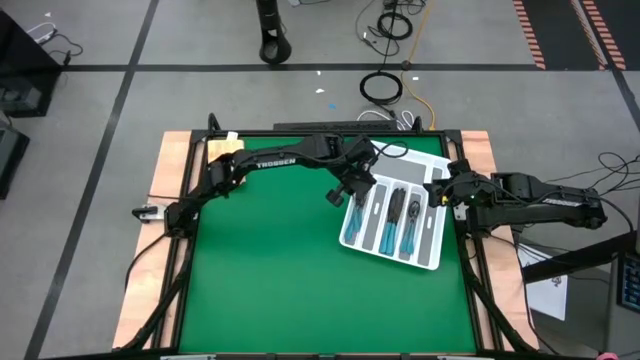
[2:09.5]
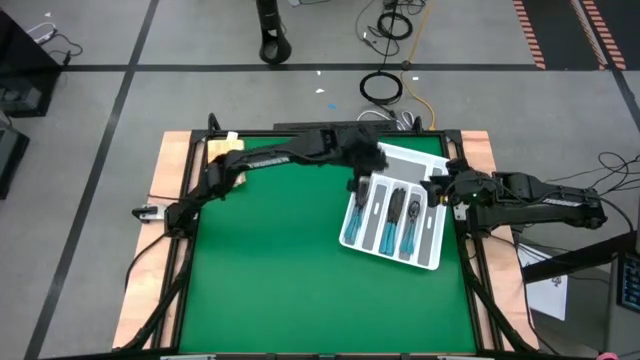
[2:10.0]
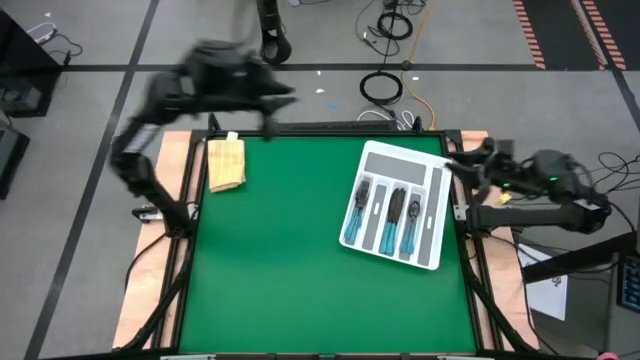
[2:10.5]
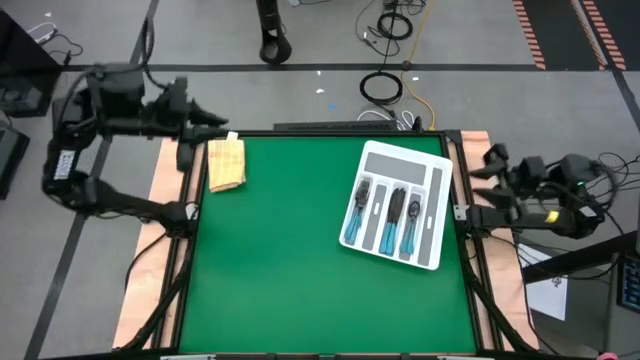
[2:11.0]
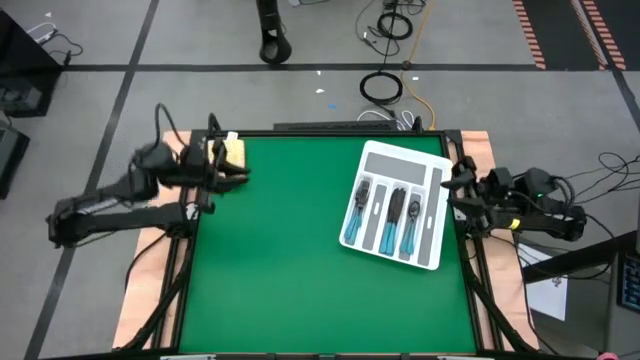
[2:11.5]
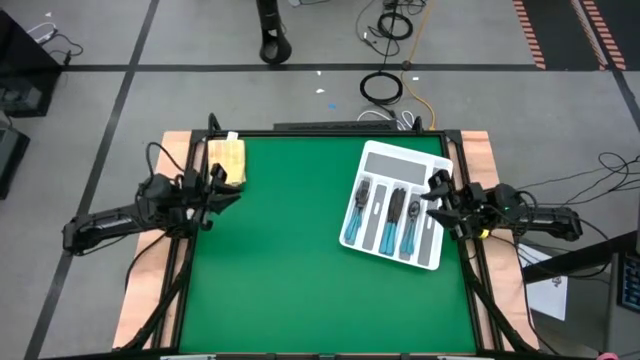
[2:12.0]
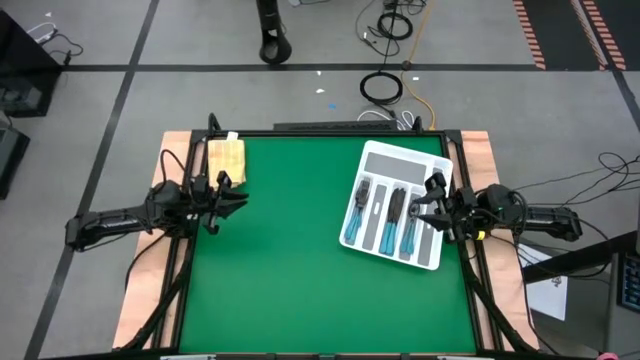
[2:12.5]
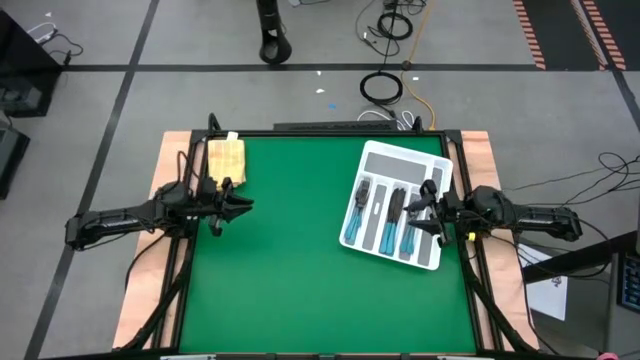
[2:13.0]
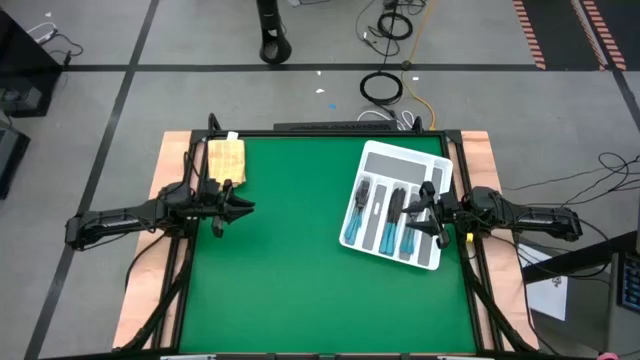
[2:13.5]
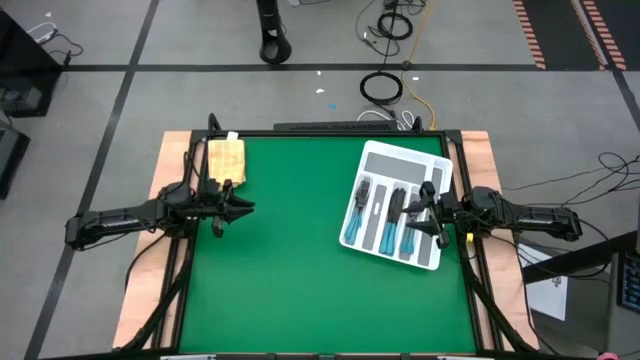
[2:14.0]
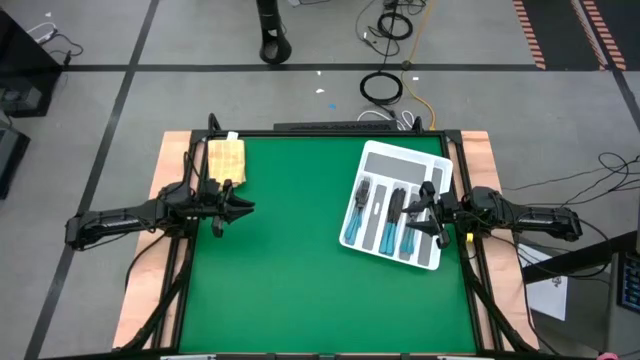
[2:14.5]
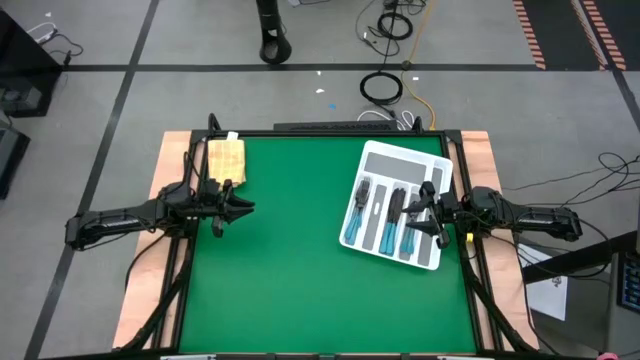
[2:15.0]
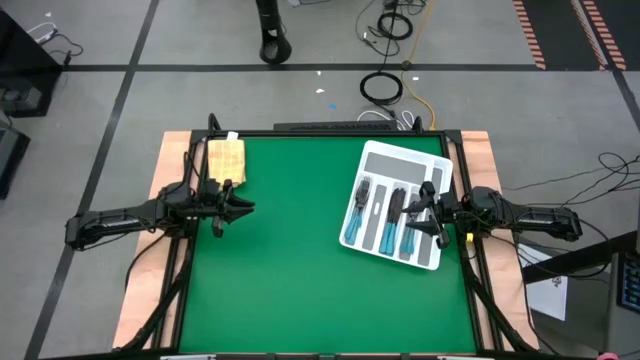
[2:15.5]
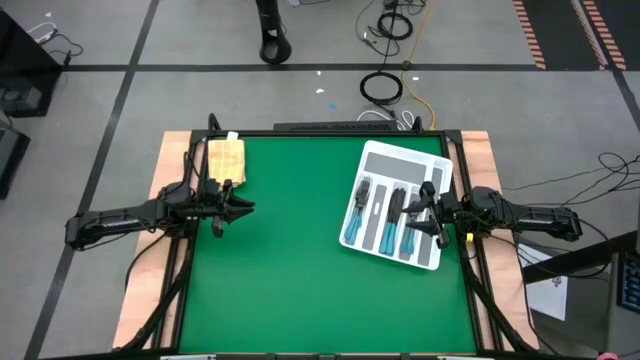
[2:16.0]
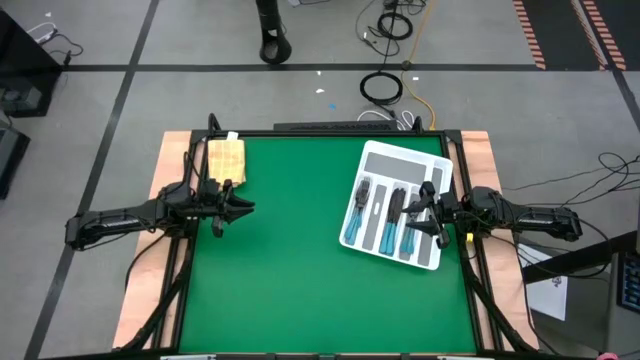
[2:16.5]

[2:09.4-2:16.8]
Task: Sort silverware
Return to Home Position

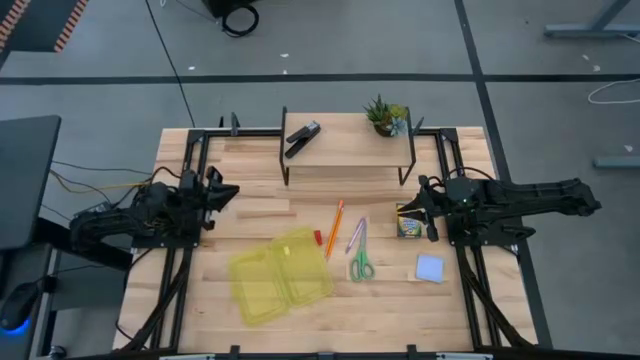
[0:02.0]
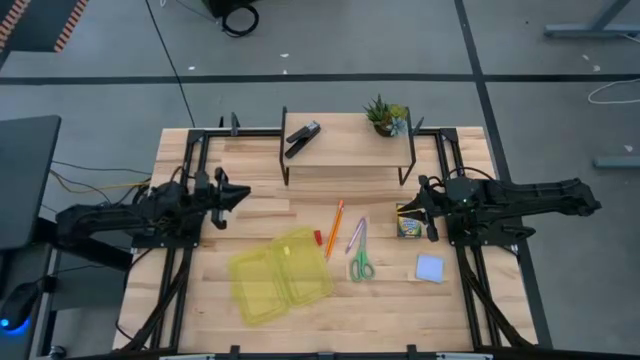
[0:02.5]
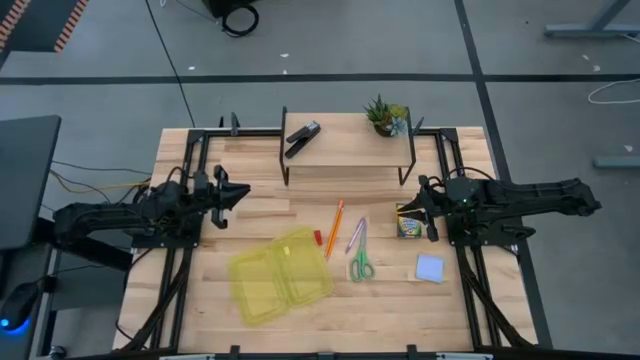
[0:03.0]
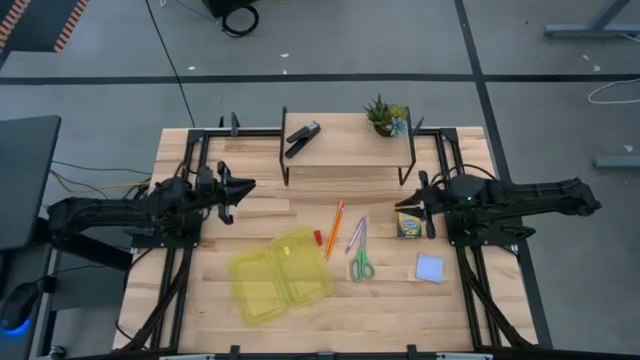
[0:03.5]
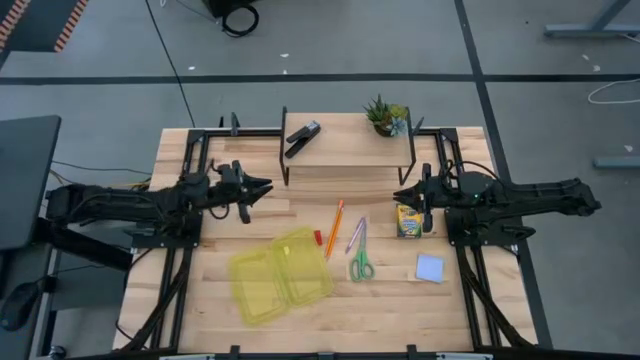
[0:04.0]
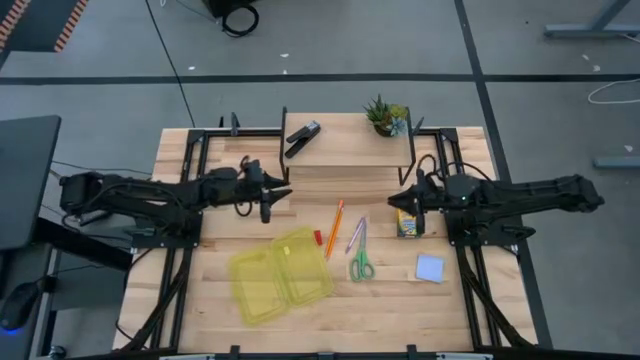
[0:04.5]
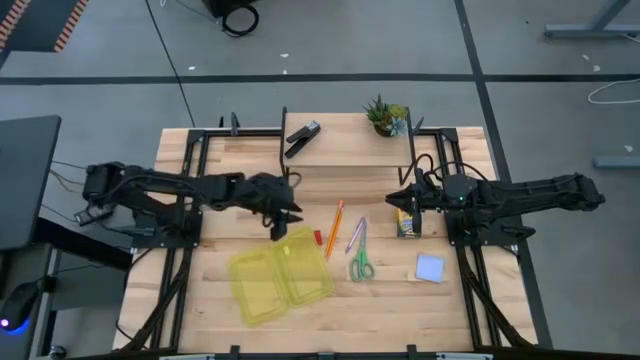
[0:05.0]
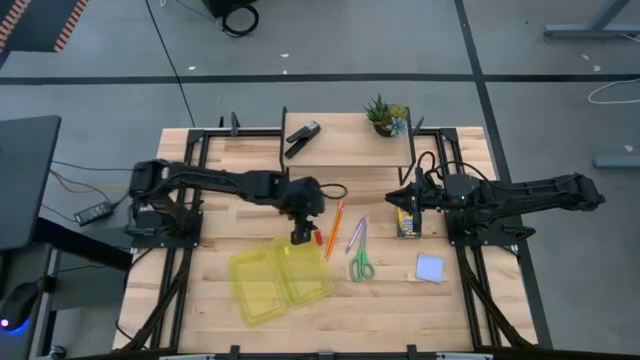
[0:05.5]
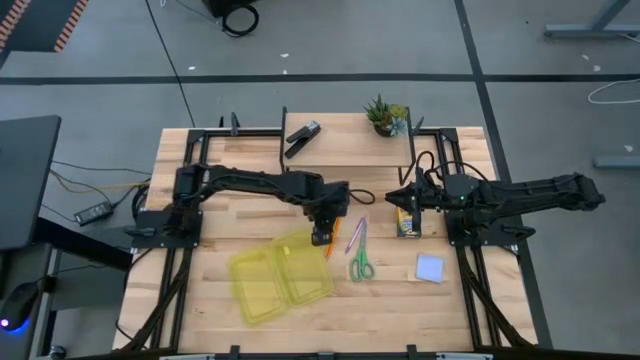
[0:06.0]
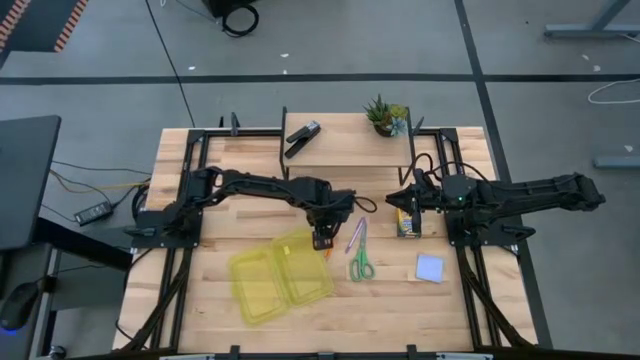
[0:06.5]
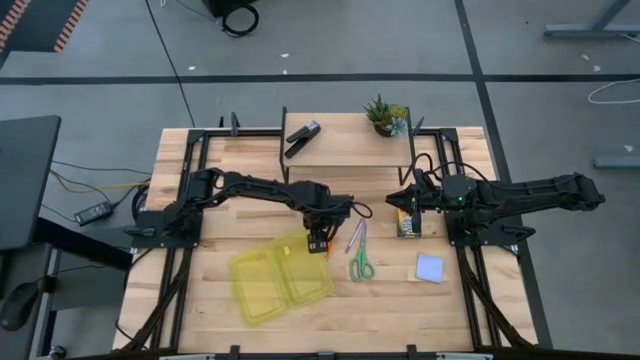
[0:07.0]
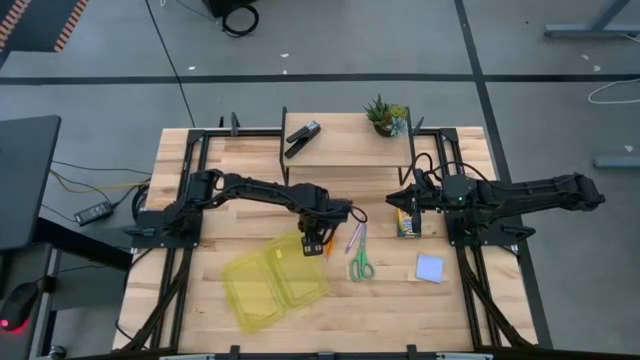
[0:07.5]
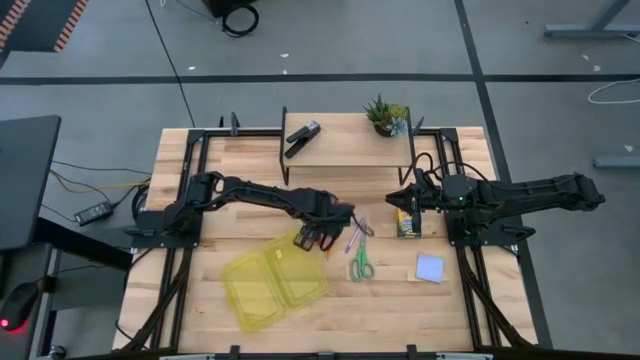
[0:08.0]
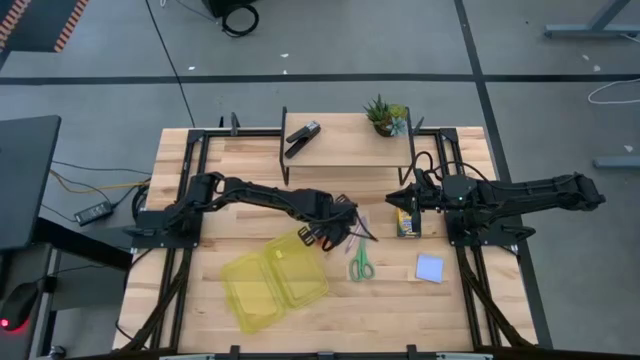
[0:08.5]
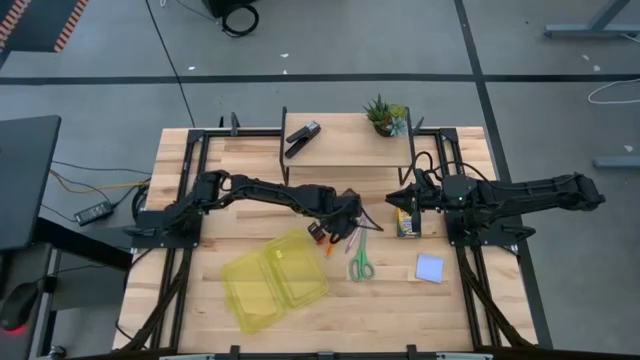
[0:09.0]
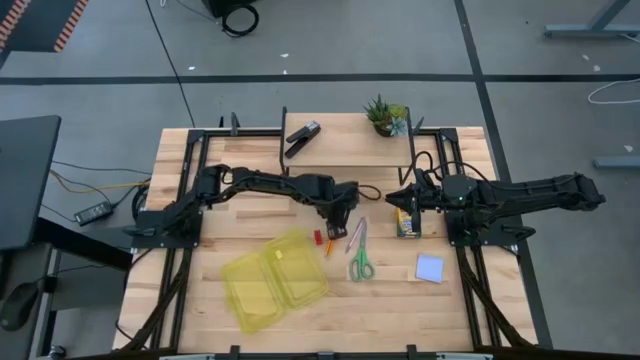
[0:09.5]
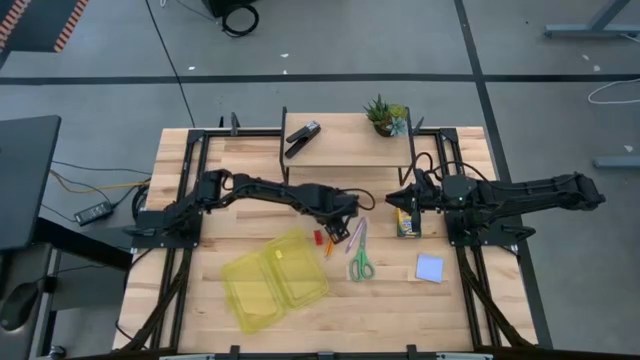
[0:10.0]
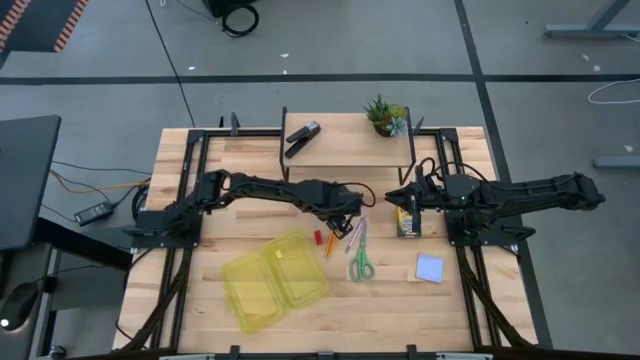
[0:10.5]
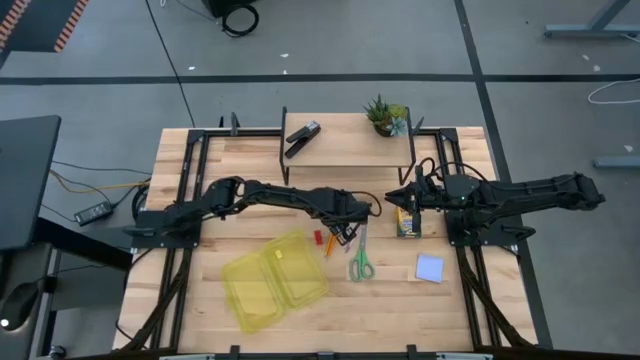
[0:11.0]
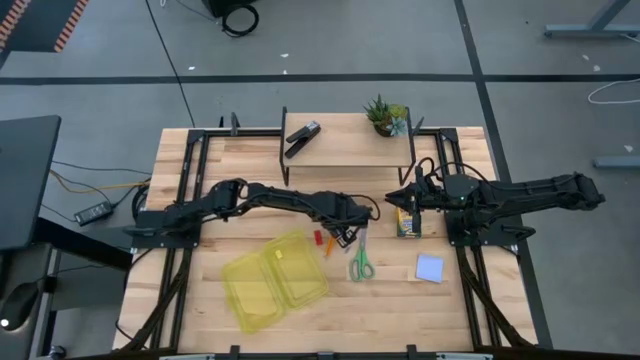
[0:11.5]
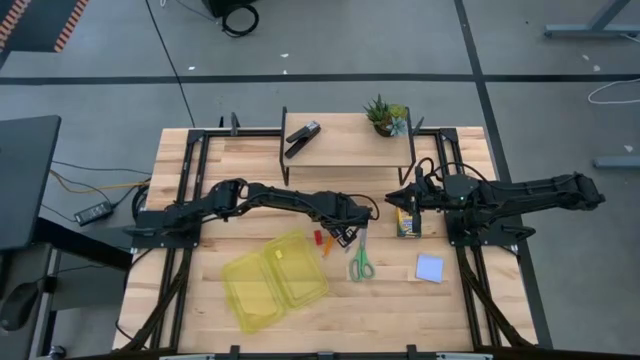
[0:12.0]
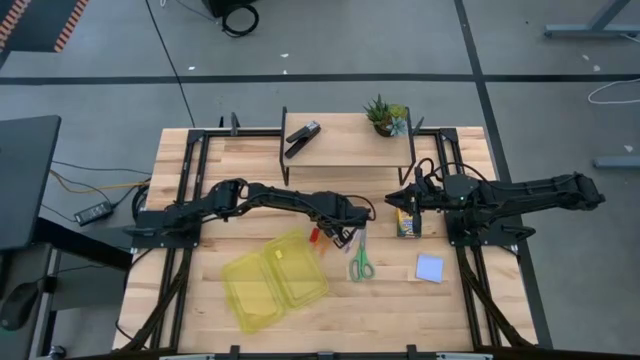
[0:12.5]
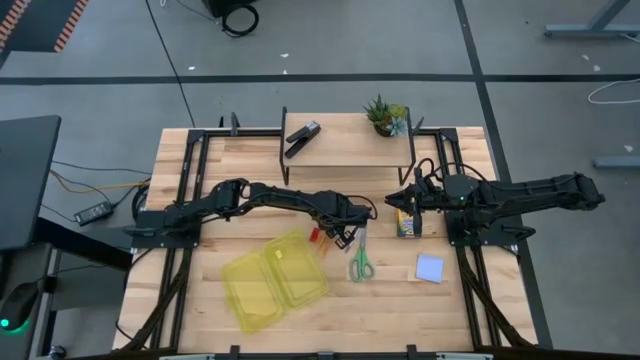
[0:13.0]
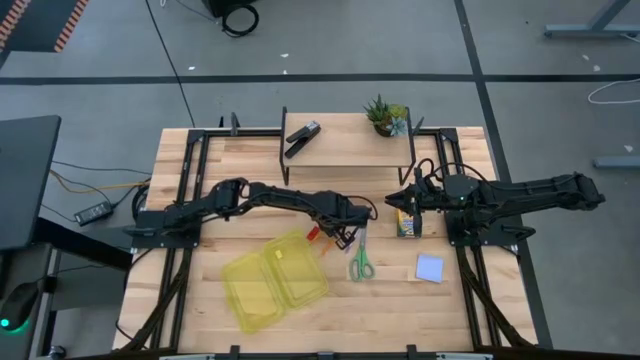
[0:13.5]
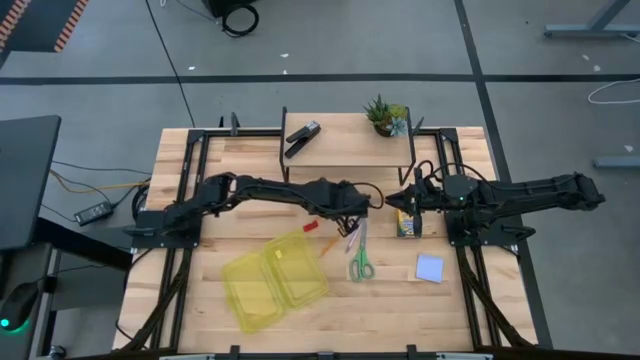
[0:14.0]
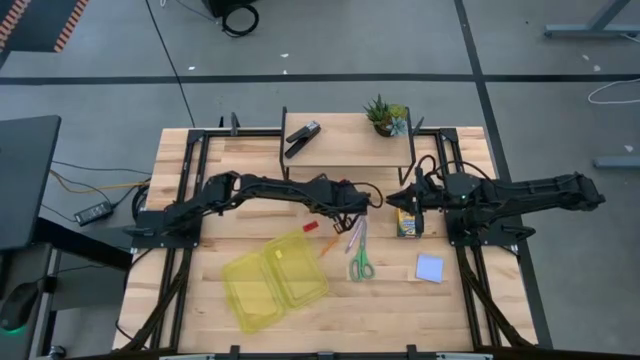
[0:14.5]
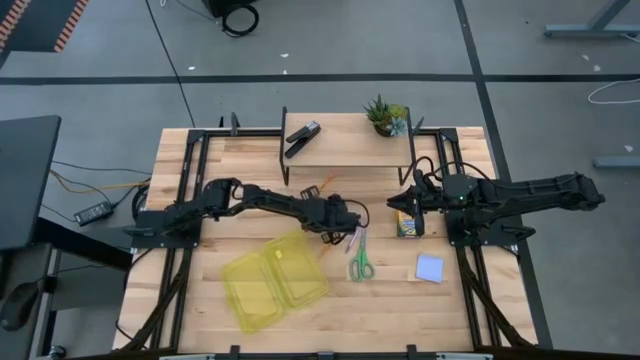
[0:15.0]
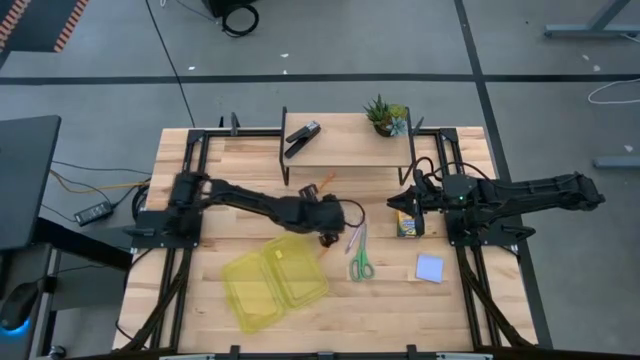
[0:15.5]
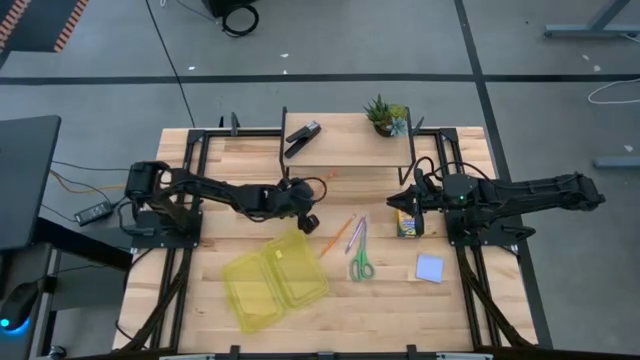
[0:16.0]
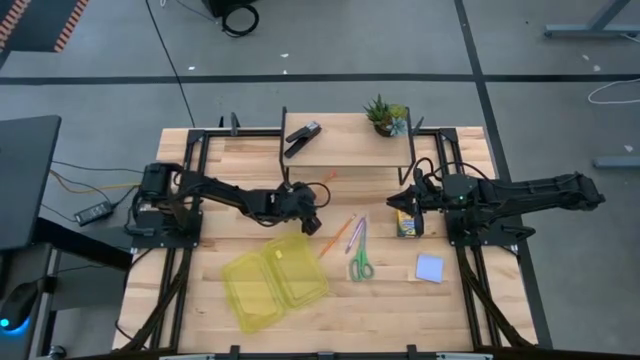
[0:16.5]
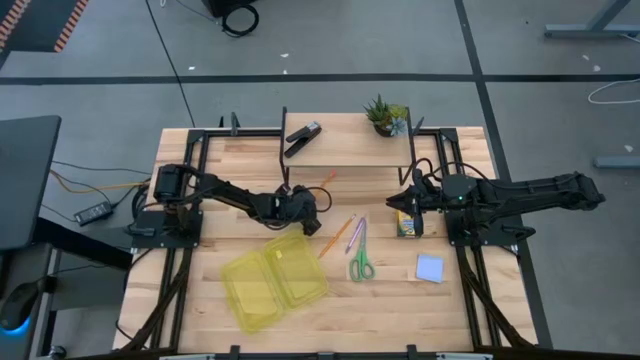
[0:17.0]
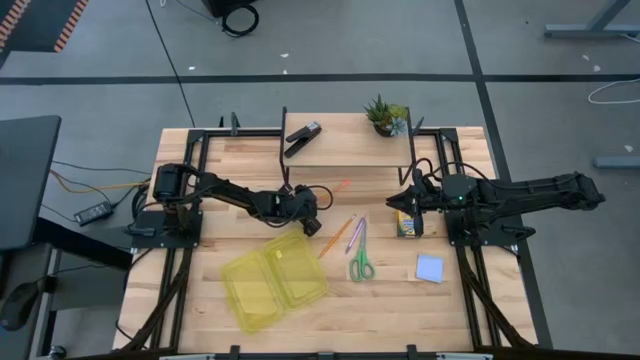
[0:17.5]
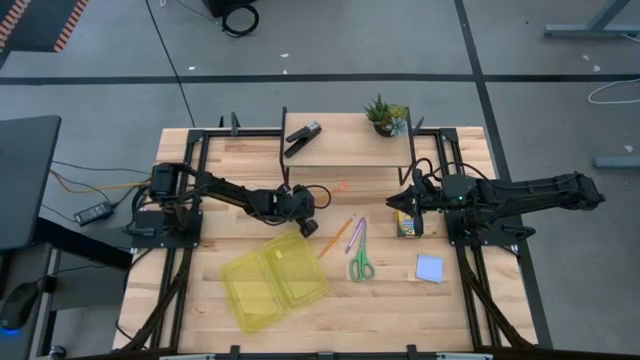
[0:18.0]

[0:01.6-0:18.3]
Task: Pack school essentials
Put the left orange pencil into the supply box
